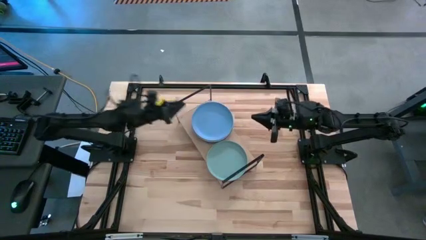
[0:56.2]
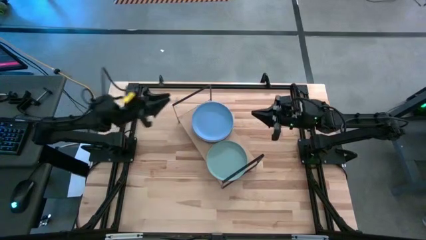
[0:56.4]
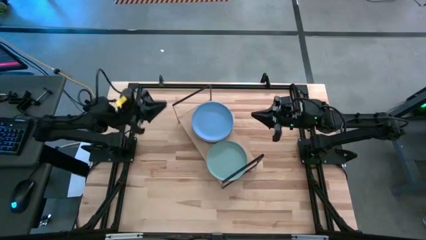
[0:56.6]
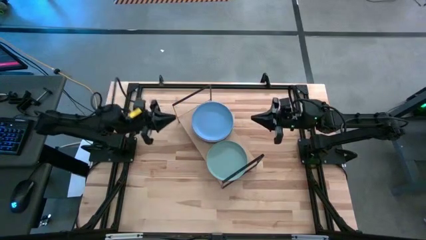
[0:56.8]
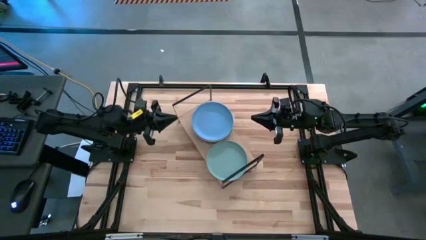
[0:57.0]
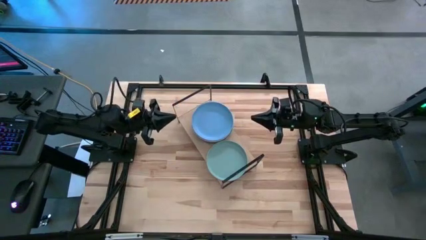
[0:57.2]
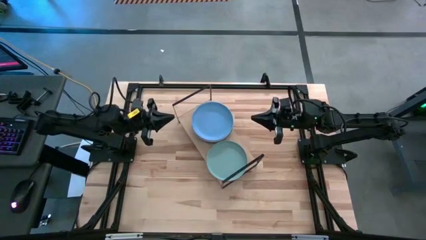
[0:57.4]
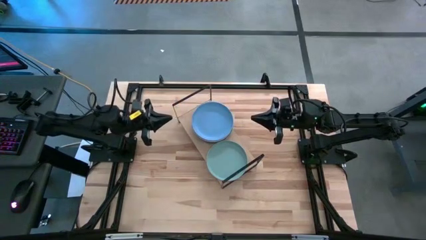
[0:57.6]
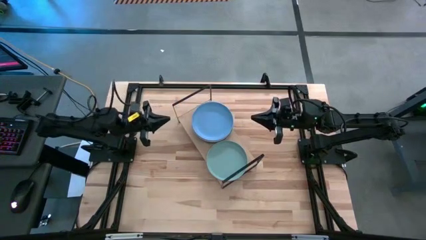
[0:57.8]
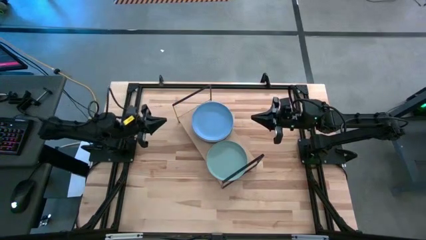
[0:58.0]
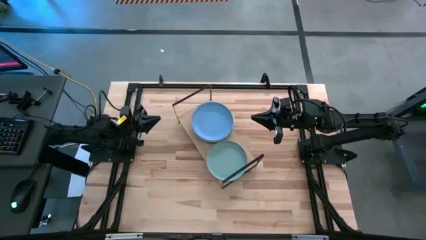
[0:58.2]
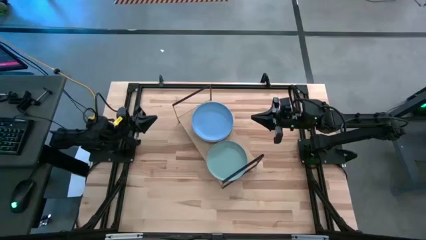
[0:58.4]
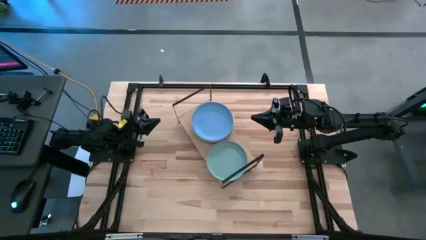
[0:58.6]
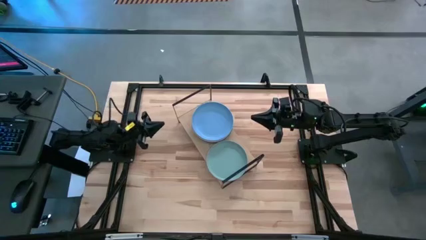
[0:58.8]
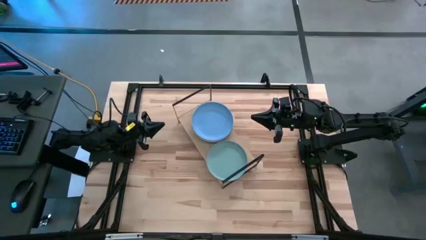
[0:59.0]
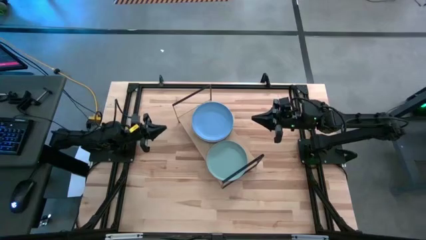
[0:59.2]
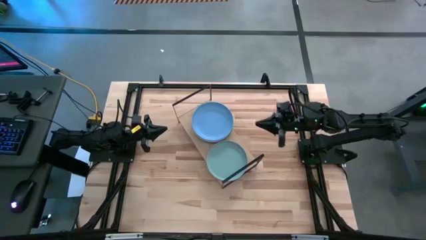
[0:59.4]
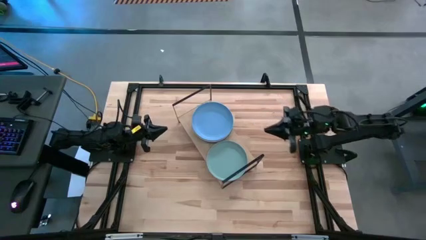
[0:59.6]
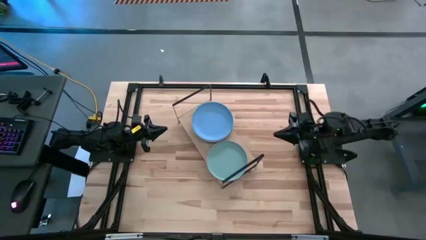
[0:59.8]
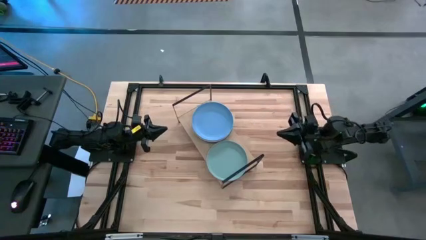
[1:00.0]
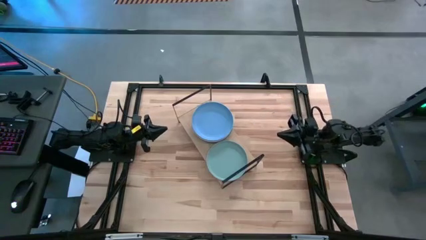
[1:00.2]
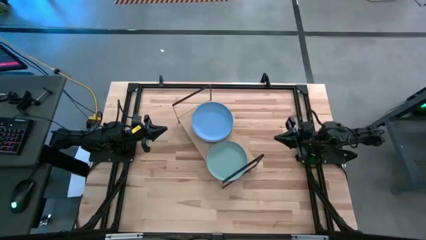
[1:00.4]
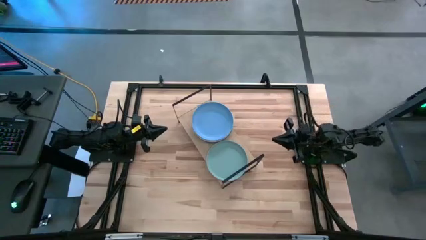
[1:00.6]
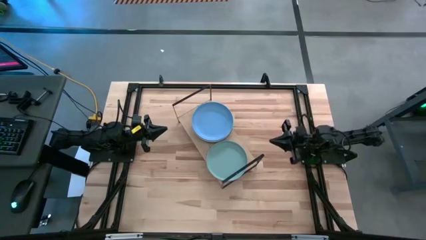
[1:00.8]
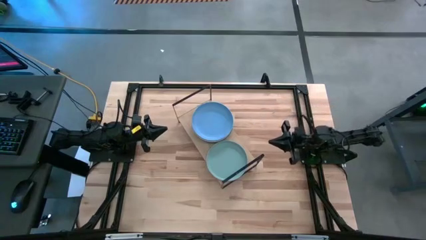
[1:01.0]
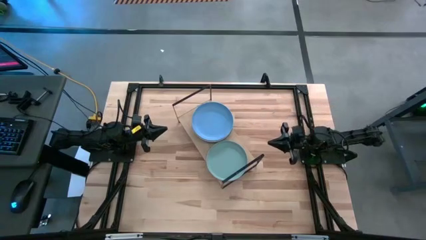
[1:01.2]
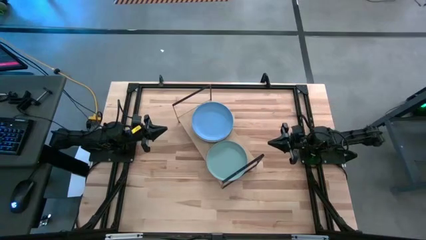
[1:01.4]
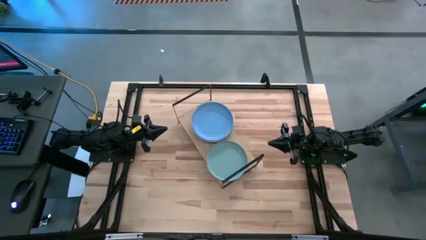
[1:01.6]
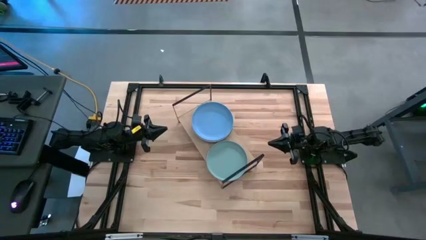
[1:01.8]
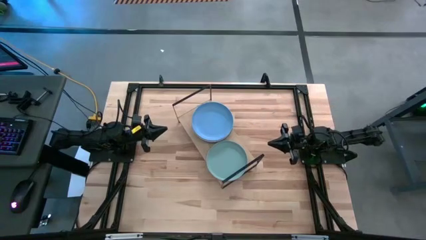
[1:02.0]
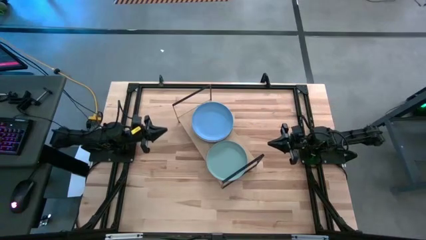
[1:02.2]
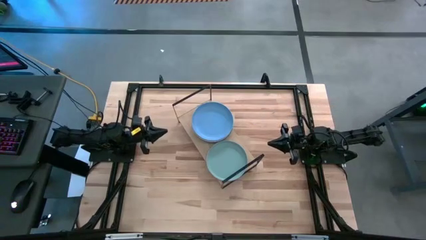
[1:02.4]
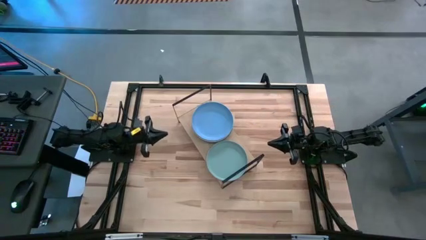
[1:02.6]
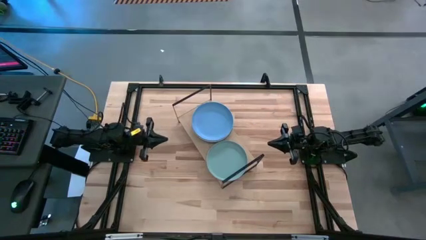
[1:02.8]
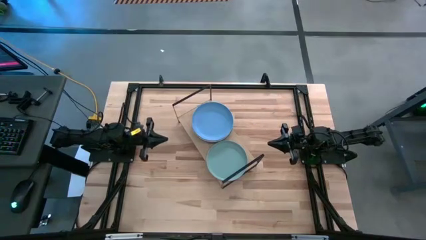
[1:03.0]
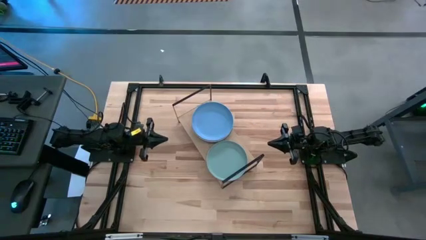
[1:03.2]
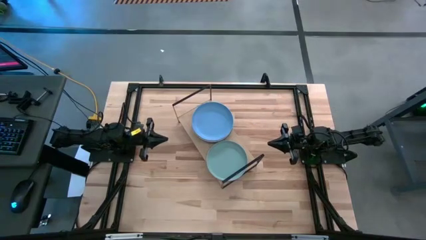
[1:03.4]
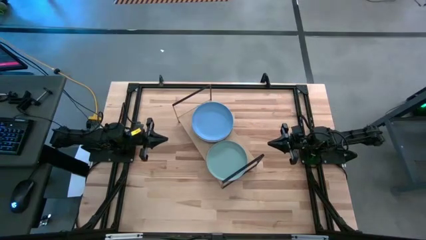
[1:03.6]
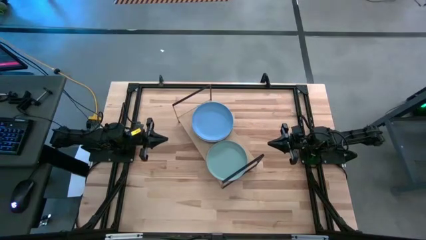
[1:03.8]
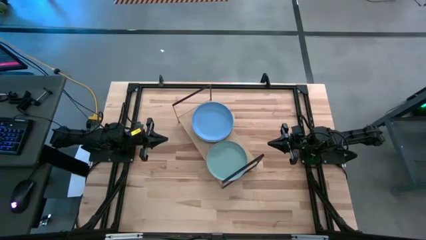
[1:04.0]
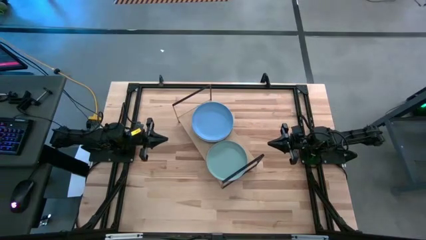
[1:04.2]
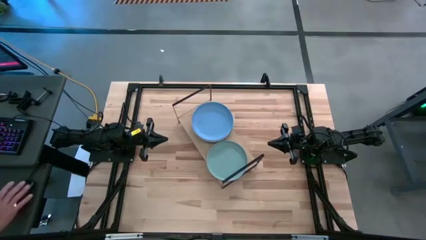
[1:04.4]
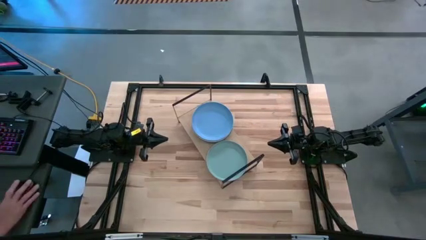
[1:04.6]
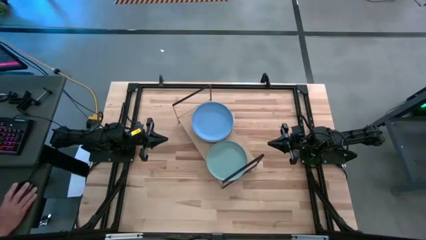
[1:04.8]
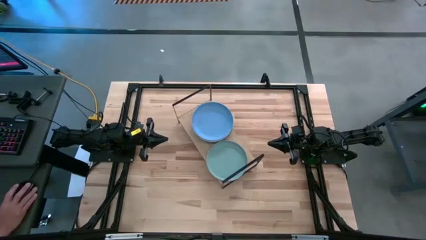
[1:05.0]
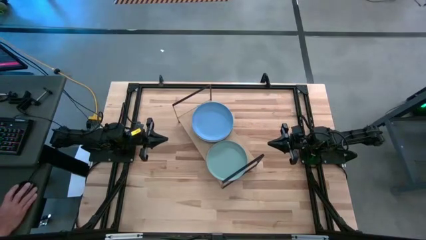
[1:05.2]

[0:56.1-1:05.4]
Task: Place and stack plates onto a shelf
Return to Home Position

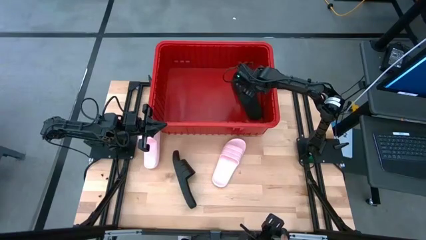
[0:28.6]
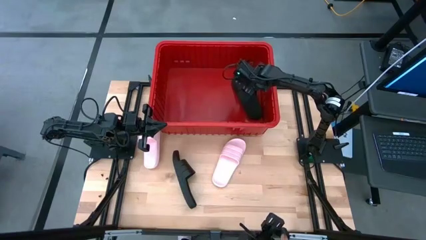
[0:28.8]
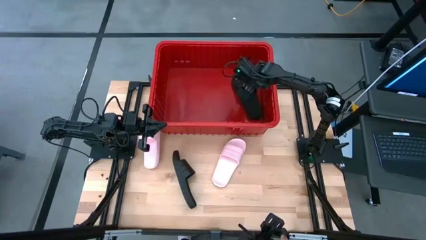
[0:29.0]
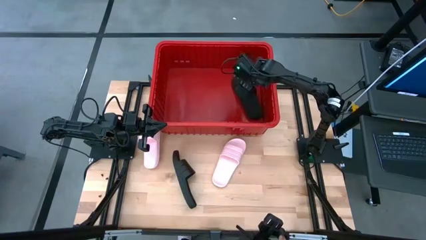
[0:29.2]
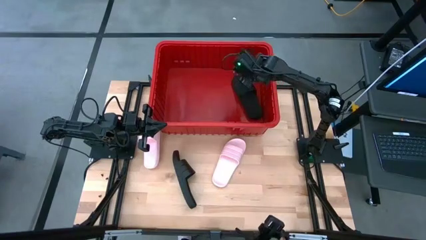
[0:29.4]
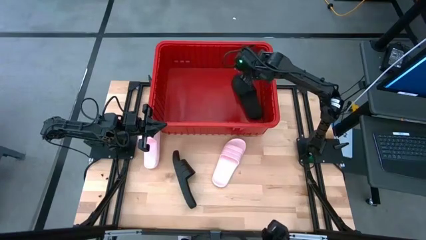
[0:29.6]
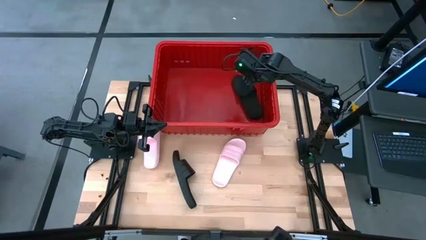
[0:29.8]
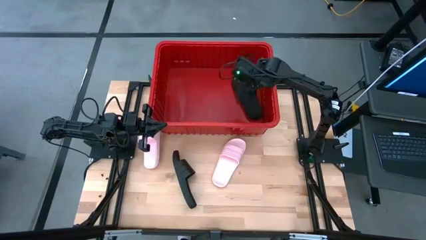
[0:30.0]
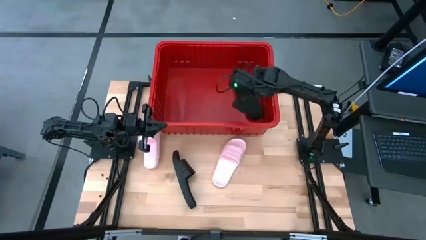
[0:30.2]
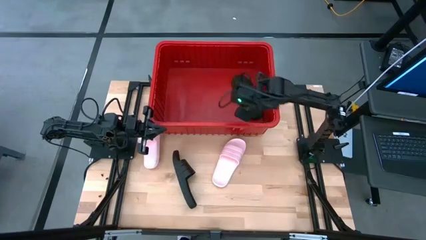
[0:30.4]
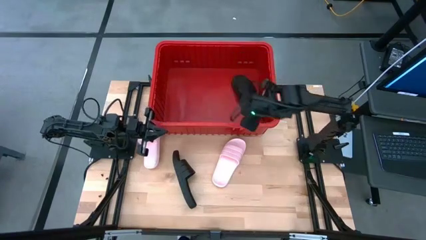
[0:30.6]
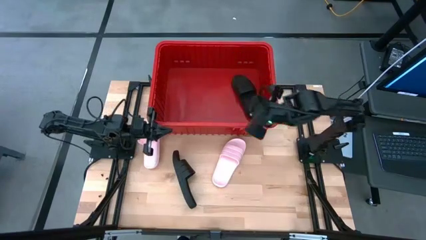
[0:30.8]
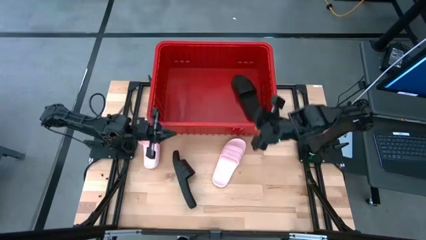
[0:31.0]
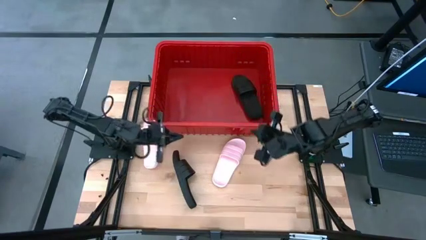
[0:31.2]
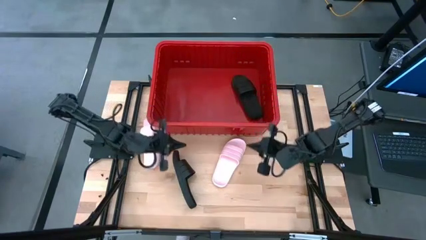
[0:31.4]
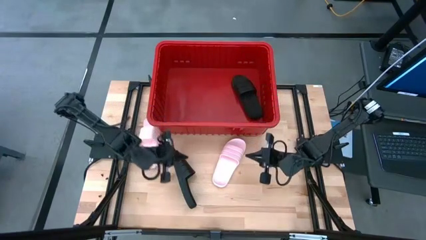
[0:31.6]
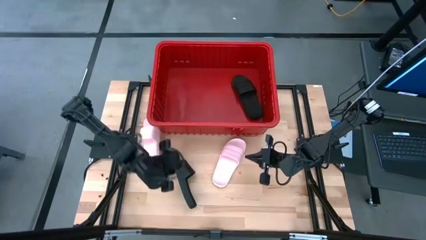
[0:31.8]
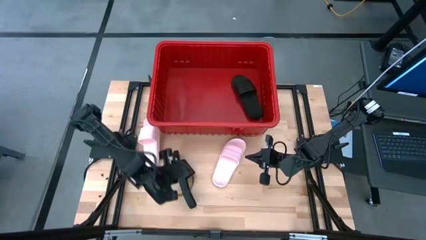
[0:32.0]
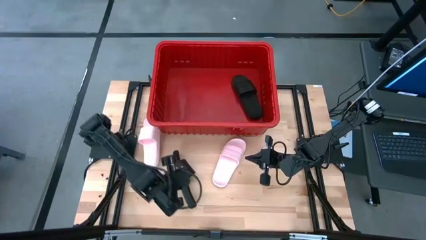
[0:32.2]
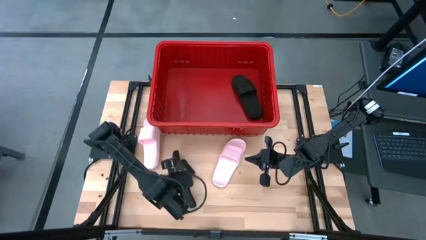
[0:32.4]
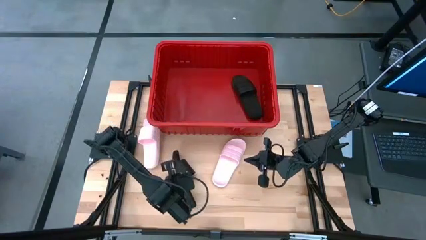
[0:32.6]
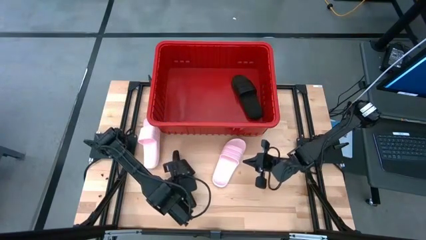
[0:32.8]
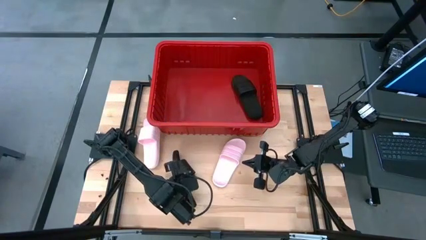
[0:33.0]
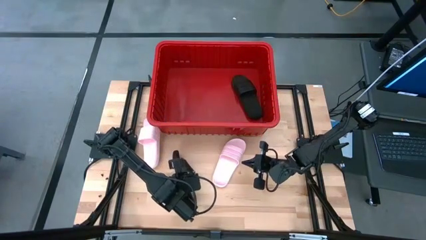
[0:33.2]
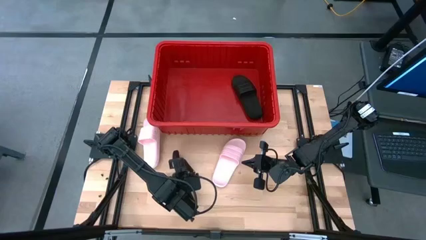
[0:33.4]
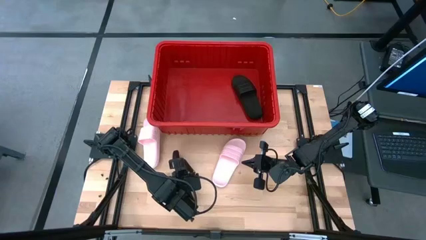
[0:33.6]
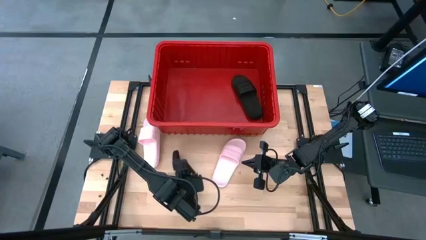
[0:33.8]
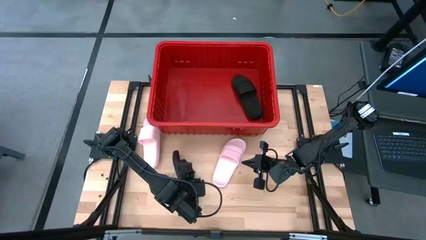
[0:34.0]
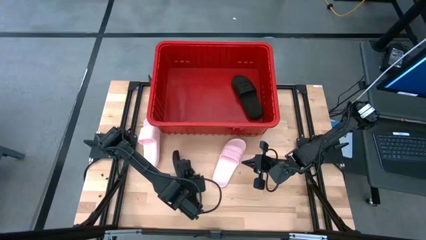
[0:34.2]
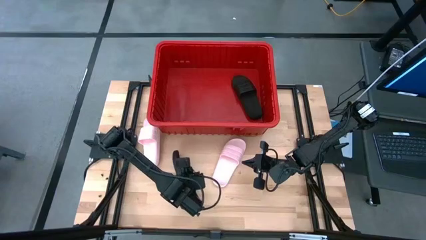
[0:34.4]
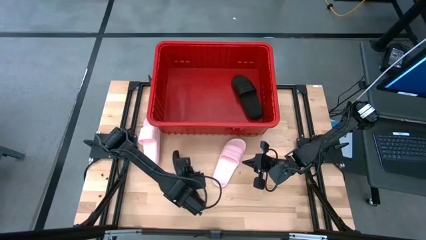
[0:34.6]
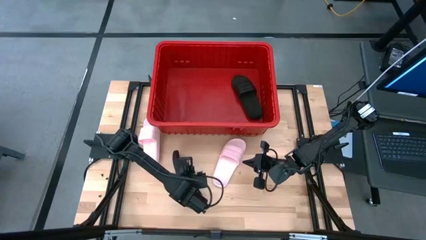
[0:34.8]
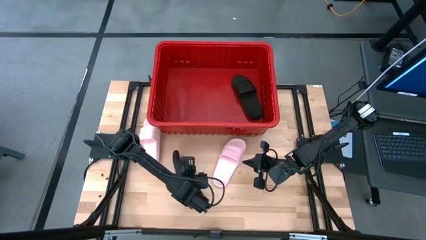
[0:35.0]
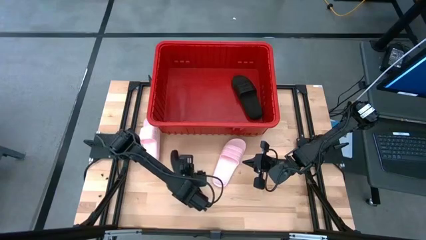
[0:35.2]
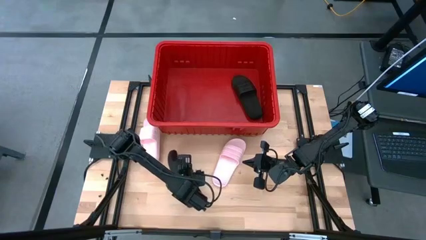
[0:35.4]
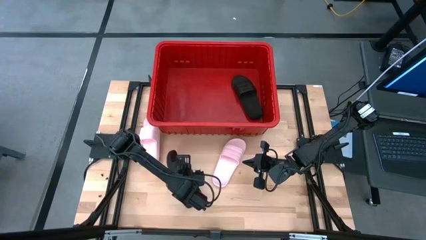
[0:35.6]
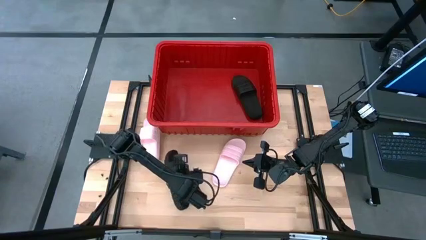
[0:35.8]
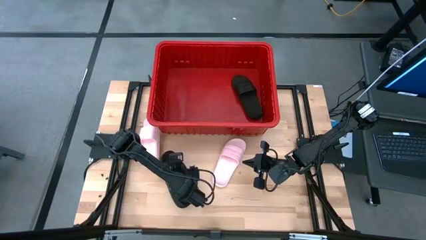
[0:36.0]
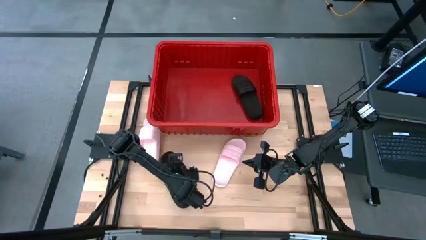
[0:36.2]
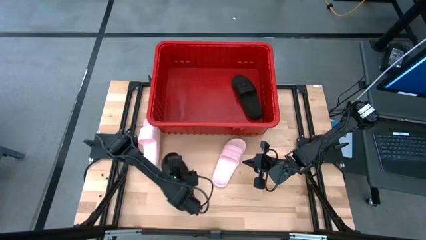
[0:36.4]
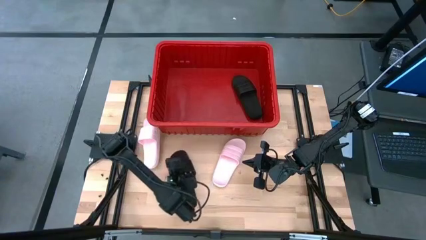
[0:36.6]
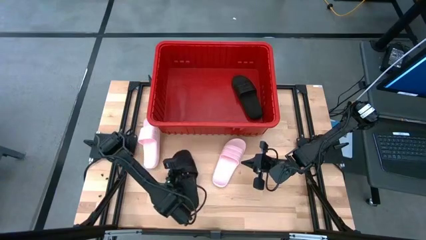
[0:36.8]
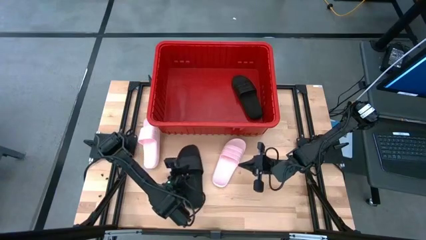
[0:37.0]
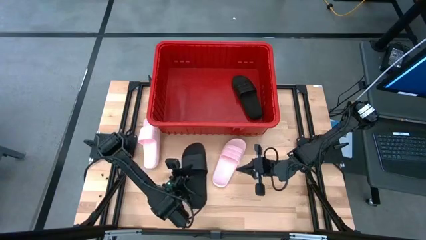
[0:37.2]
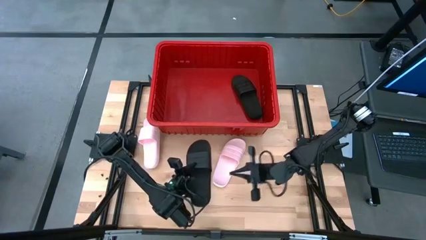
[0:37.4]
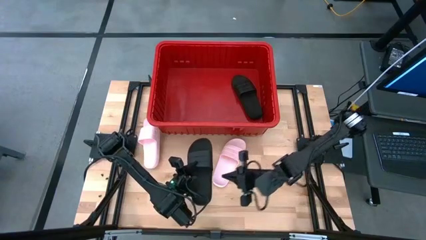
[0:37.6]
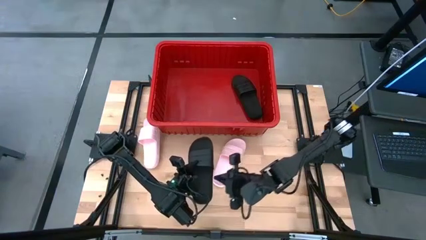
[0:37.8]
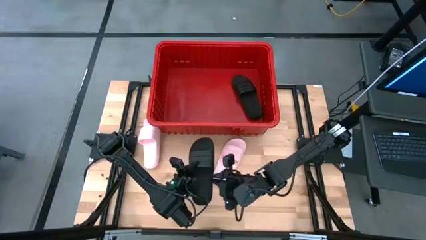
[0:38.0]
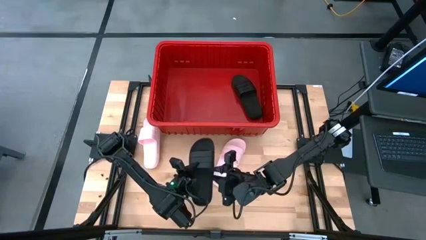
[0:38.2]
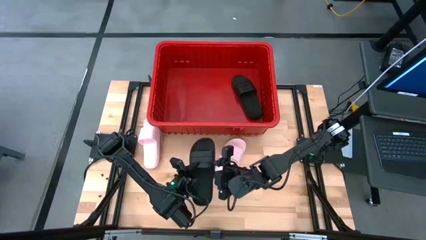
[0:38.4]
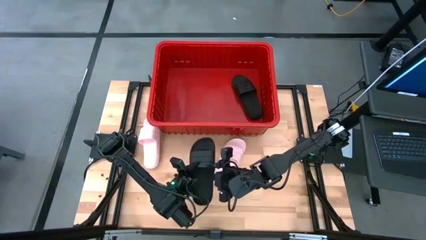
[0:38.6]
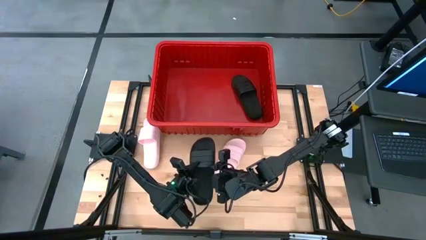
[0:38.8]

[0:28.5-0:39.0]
Task: Pick and place slides into bin
Put the black slide into the bin
